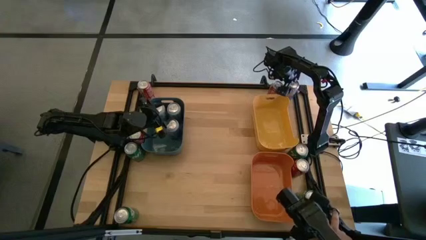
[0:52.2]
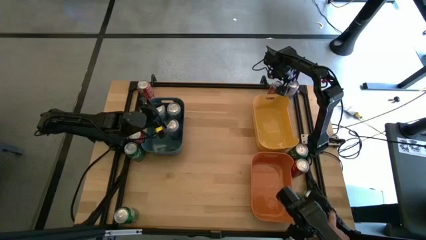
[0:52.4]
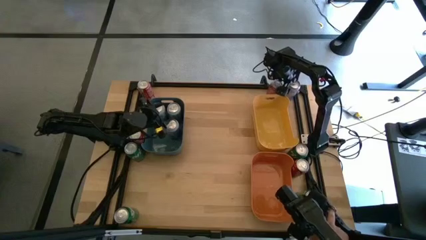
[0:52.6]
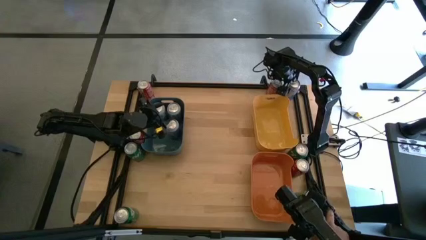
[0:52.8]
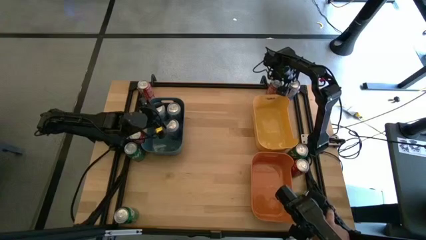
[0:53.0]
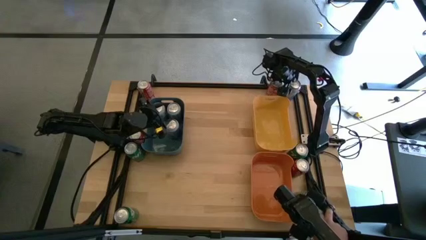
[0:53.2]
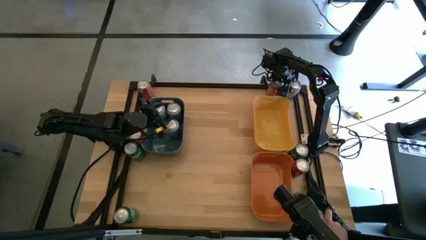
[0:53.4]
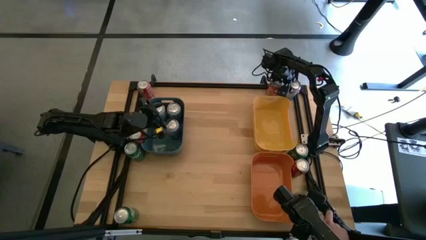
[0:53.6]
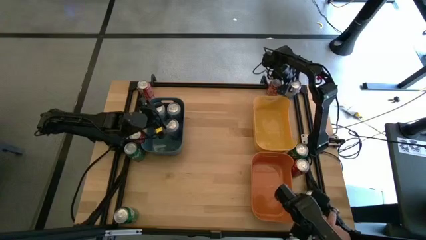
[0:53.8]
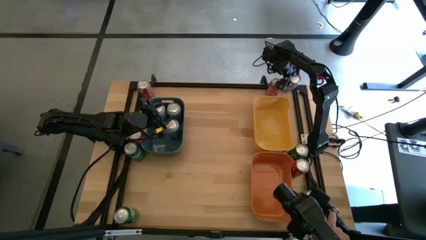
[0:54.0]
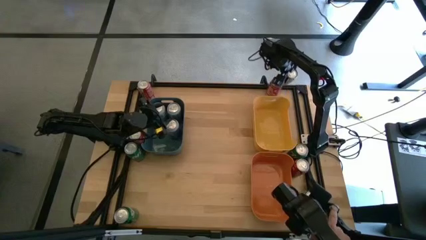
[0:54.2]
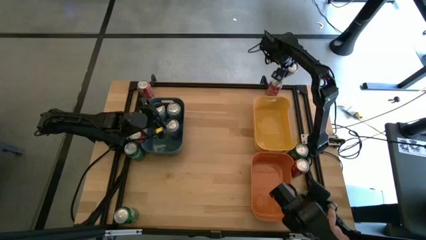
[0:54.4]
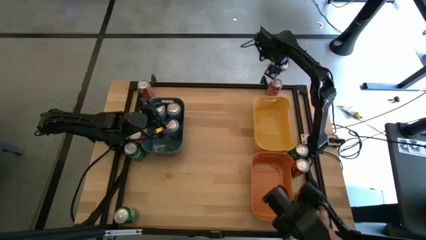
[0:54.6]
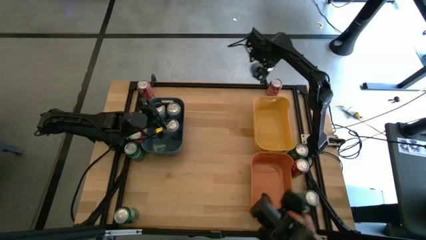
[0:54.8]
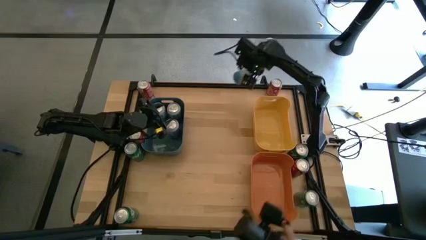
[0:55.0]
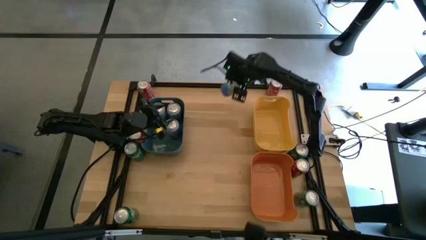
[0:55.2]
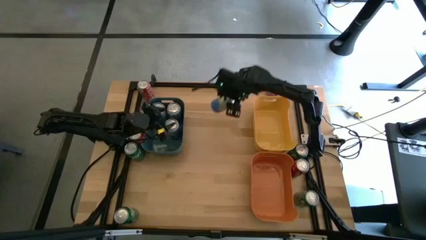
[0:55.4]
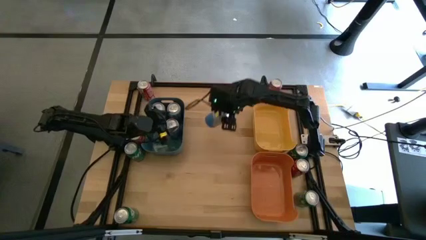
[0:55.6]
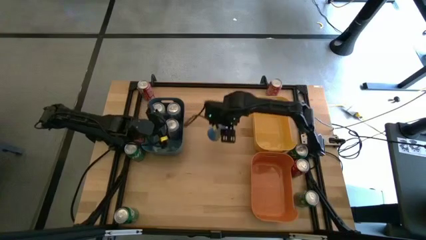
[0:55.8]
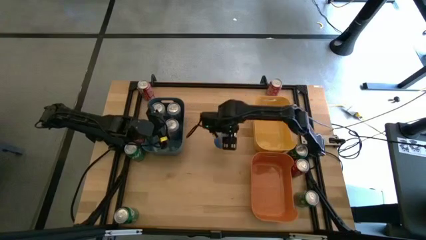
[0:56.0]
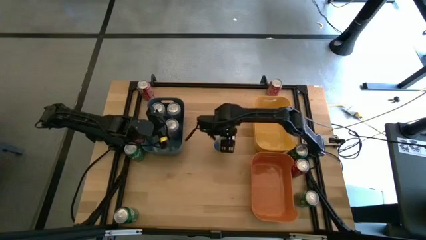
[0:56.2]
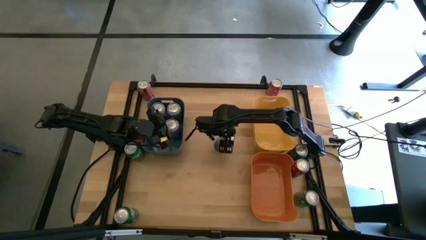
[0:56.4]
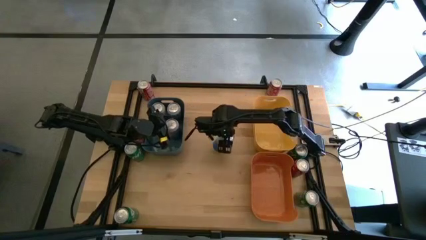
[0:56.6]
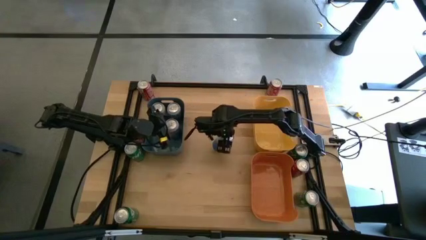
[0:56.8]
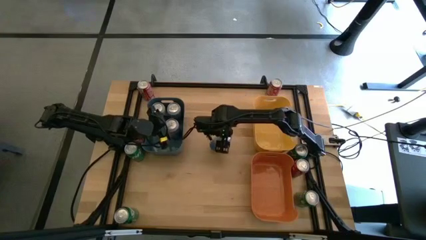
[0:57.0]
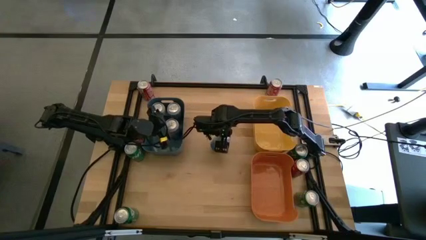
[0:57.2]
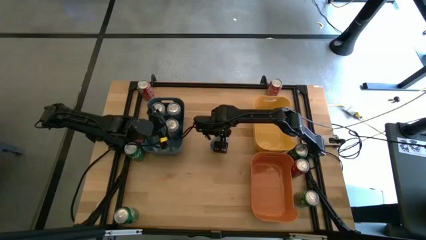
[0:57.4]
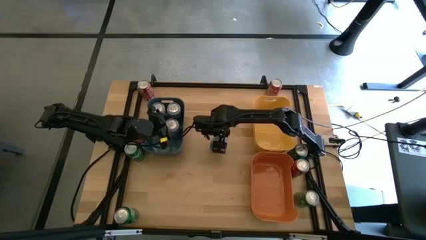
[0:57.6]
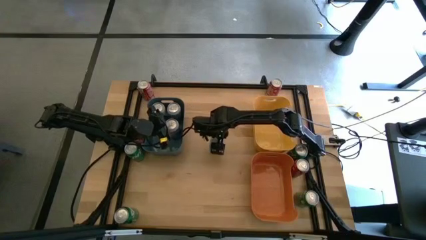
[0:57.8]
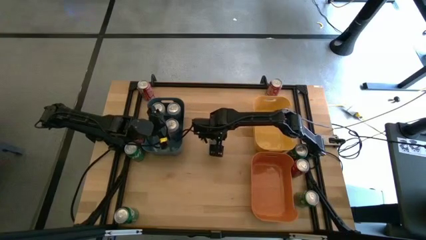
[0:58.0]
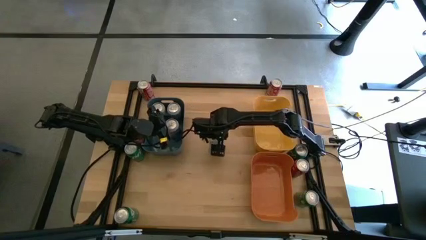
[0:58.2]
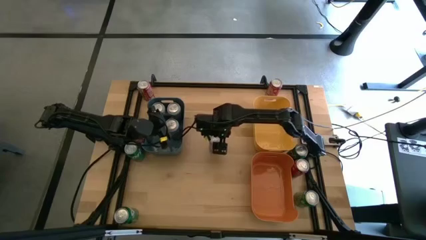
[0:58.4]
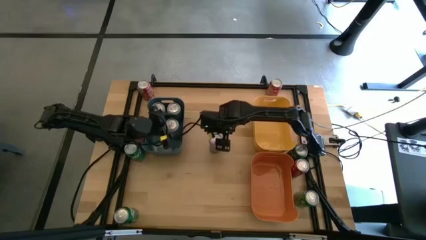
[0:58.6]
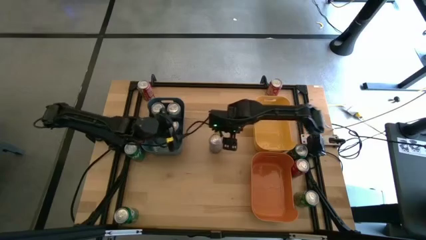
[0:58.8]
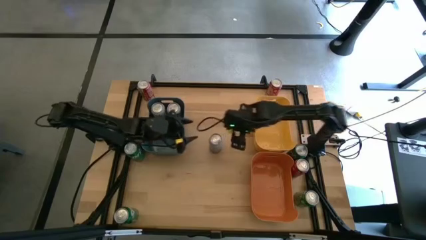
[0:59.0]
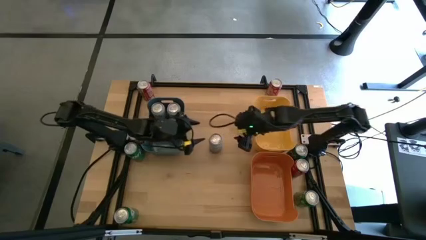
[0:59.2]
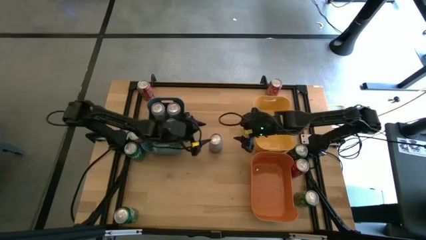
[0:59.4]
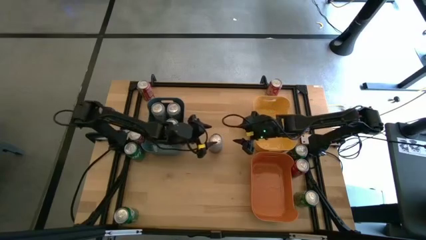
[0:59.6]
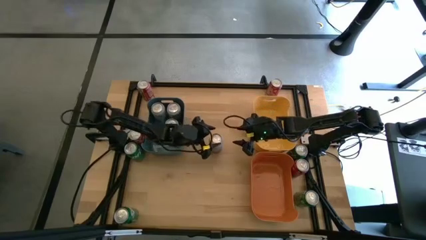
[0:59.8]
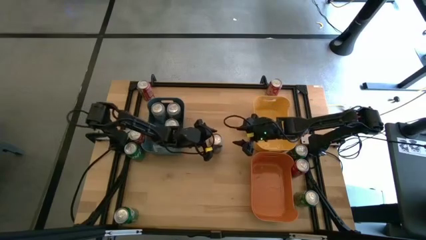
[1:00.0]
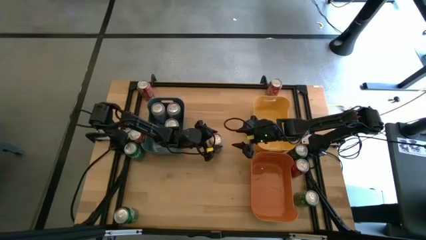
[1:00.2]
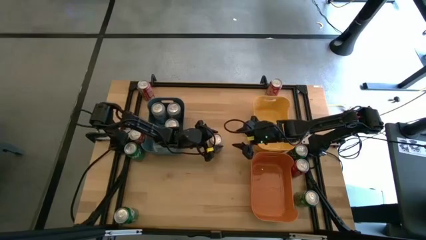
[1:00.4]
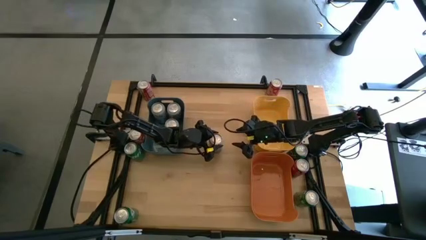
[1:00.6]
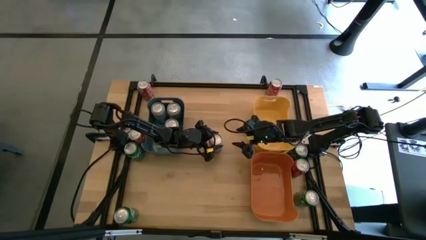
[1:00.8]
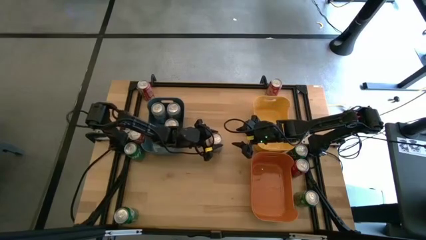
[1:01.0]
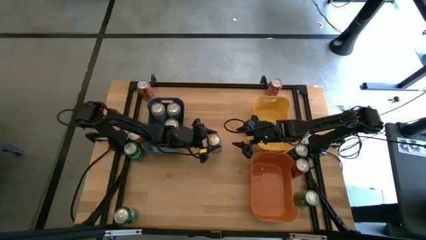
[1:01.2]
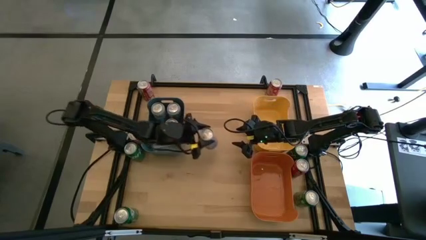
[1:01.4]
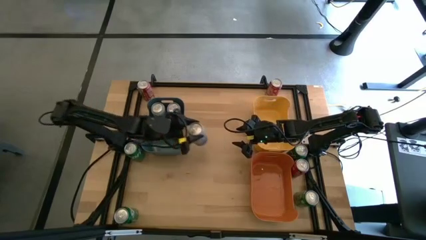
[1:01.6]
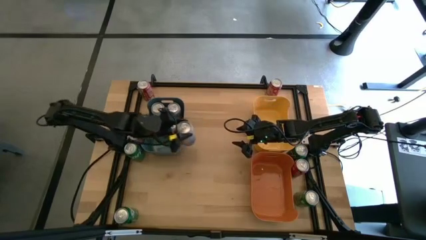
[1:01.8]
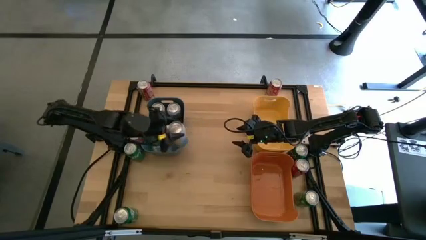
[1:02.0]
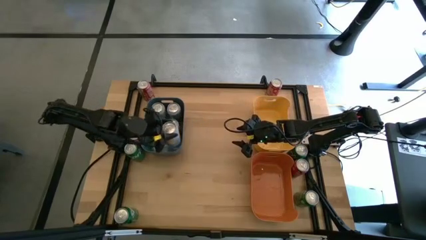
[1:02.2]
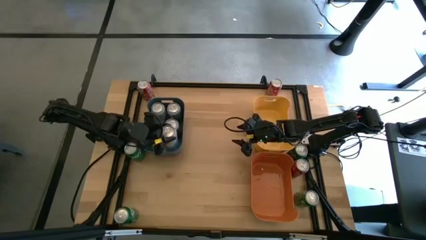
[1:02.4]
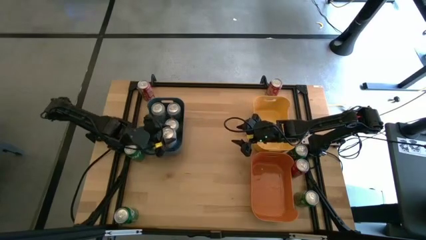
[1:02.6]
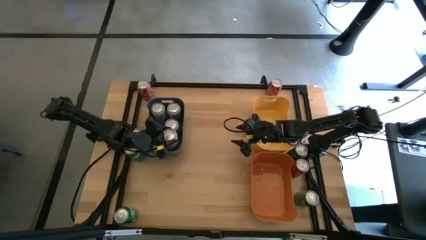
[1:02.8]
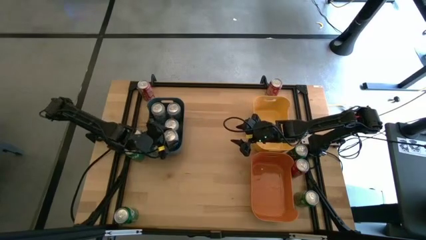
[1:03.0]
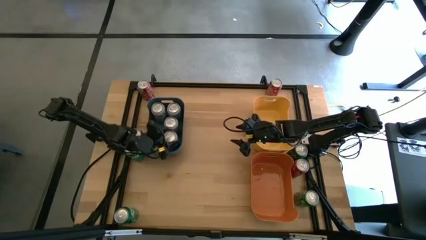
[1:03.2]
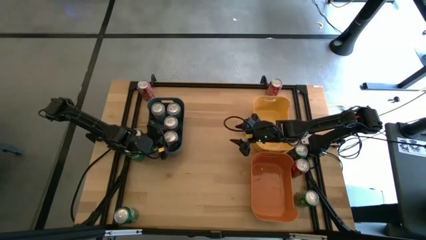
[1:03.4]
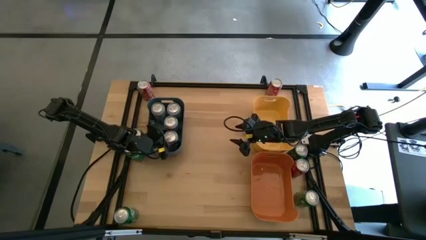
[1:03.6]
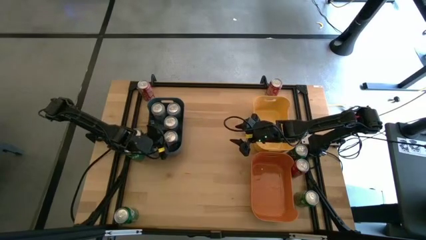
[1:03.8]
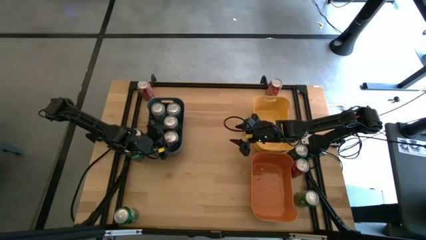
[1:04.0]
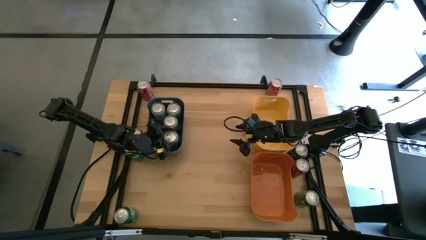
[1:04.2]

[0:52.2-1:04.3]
Task: Sort soda cans
Put the blue-white soda can into the blue bin

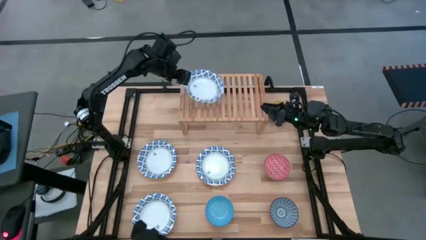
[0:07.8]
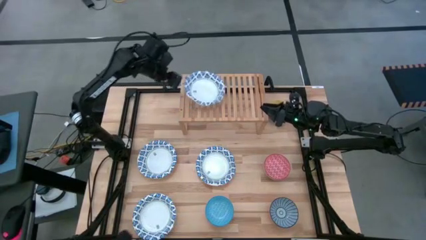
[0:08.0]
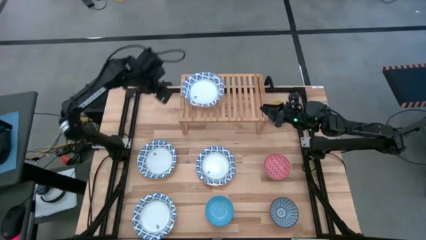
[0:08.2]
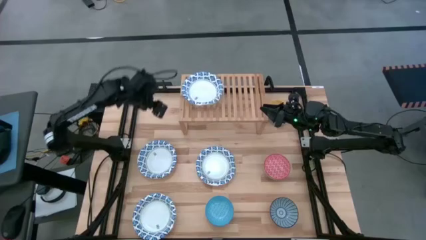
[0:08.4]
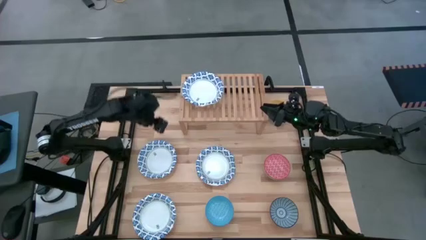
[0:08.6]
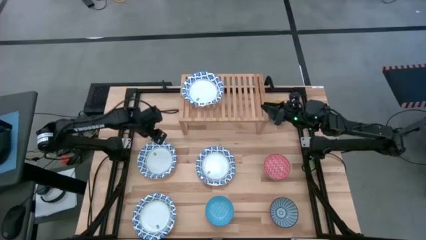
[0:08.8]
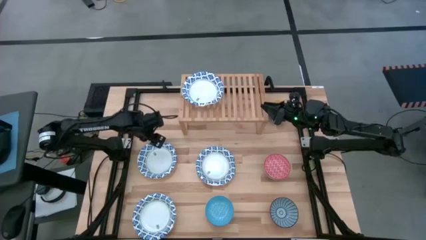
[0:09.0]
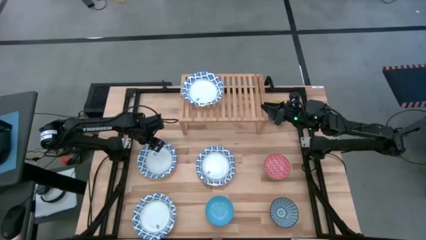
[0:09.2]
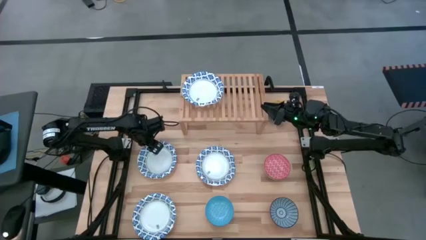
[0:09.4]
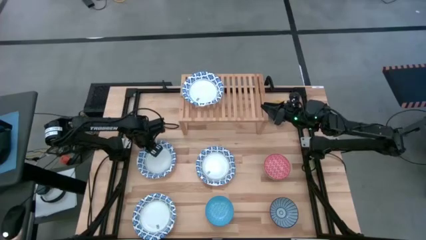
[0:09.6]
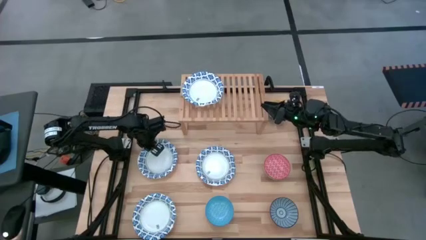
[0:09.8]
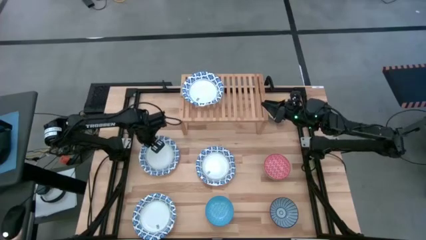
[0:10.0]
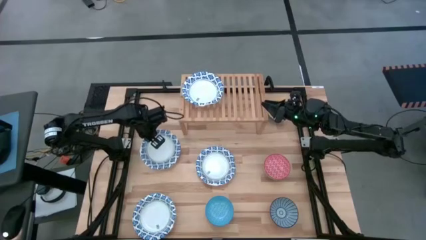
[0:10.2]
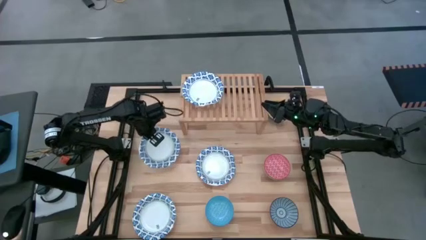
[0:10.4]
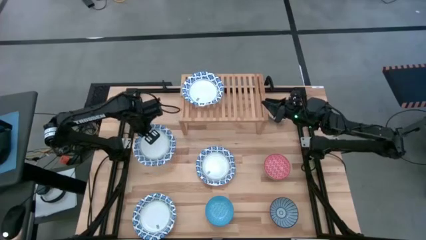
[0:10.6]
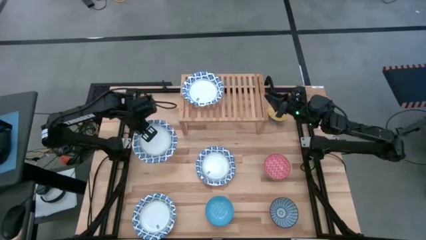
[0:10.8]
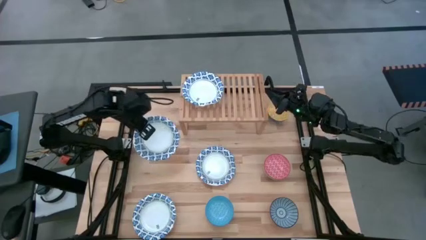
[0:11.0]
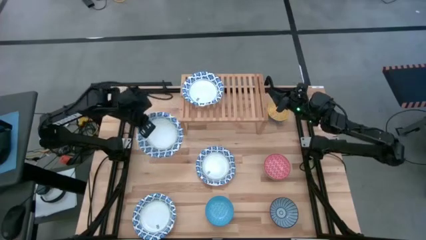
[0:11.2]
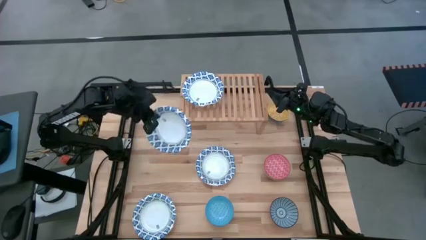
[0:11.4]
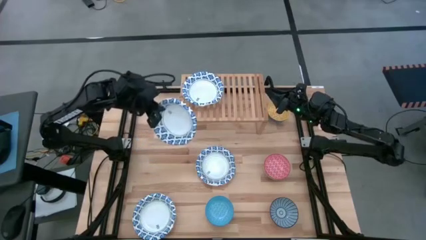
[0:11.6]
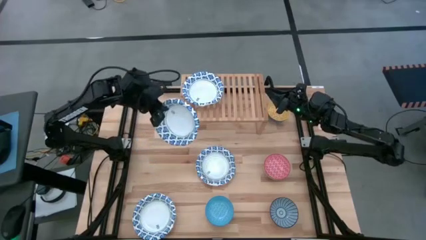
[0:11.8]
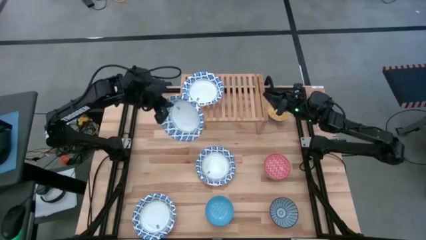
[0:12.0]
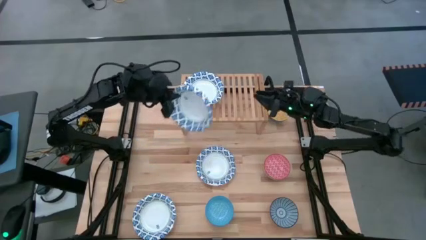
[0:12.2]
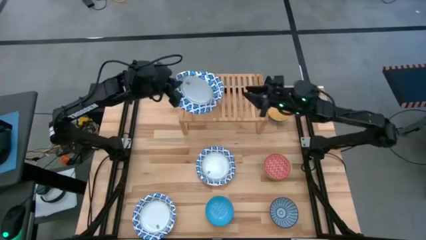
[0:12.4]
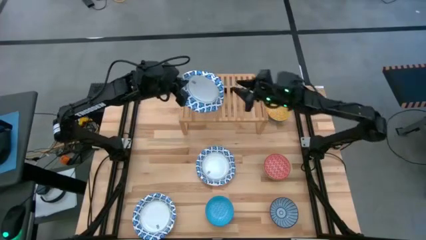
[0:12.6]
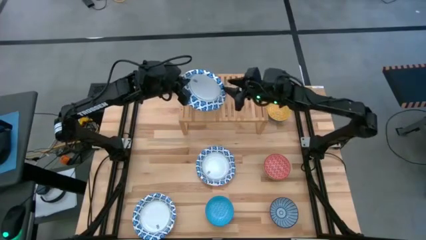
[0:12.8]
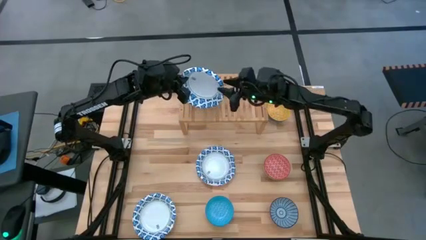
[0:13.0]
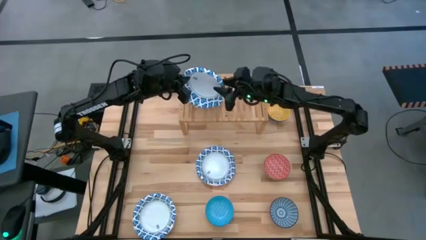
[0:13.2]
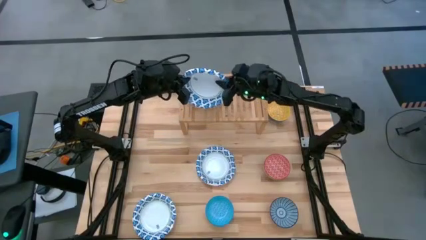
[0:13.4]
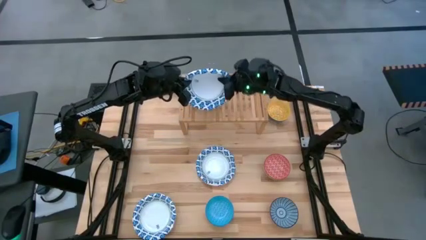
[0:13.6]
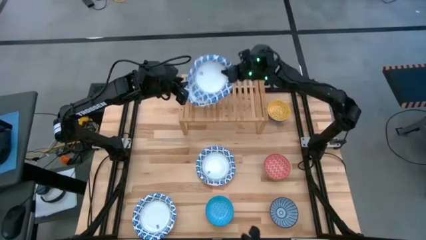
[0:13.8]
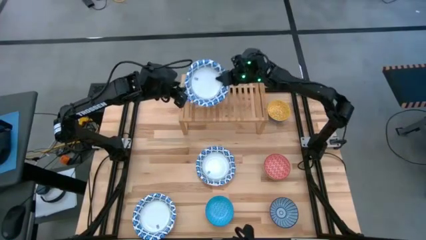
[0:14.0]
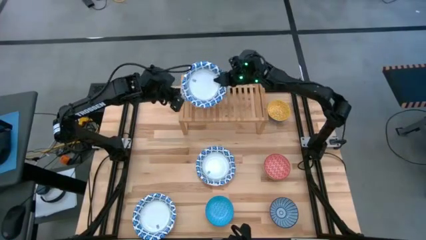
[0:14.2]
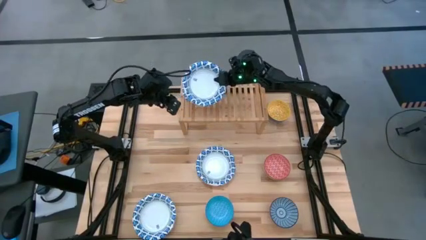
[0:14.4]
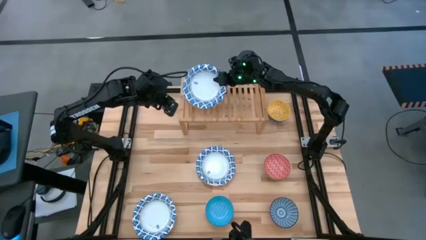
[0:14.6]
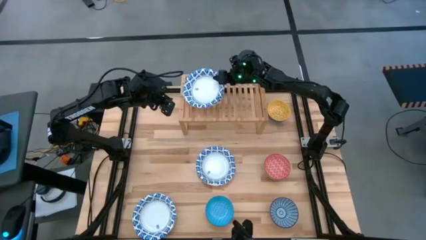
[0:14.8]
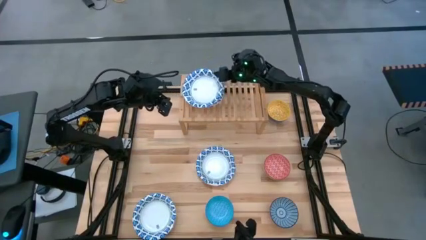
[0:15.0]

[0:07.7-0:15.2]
Task: Place and stack bowls onto a shelf
Stack the top left white bowl on top of the other white bowl on the shelf
